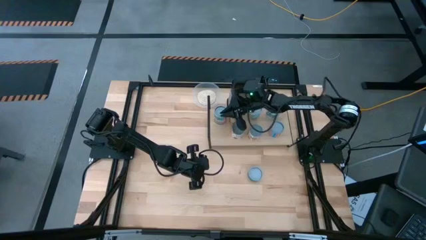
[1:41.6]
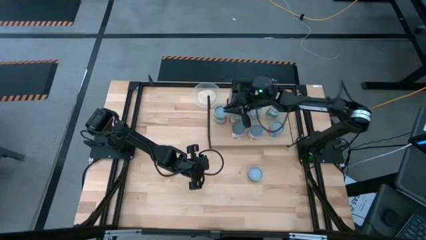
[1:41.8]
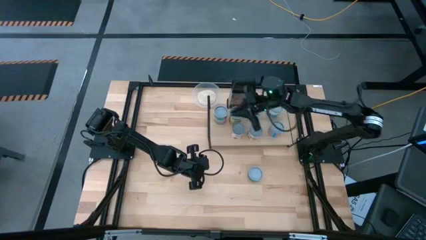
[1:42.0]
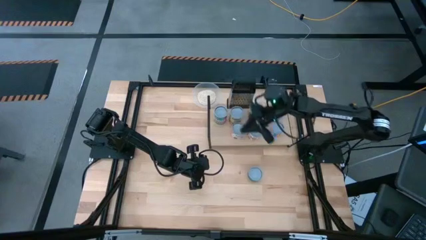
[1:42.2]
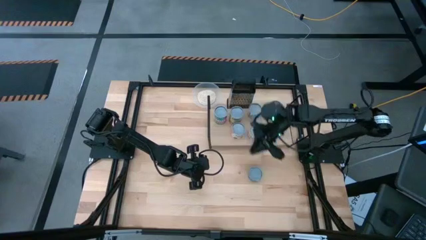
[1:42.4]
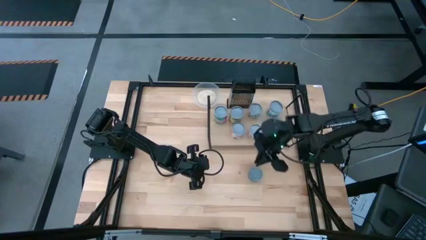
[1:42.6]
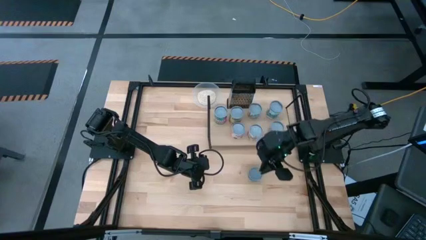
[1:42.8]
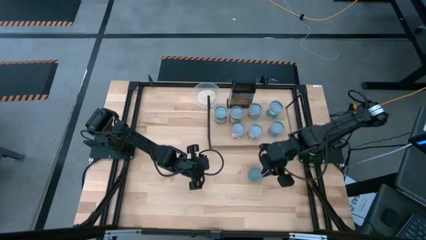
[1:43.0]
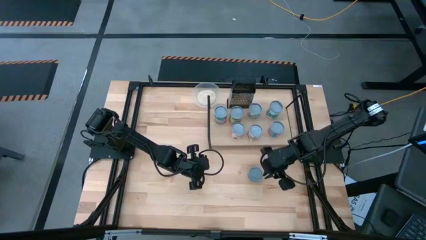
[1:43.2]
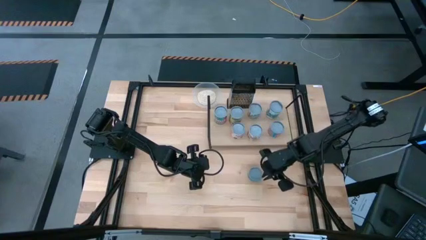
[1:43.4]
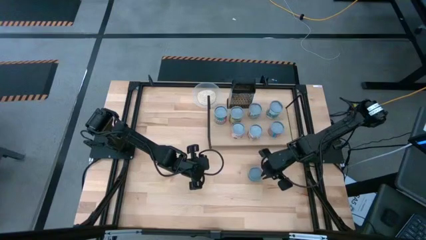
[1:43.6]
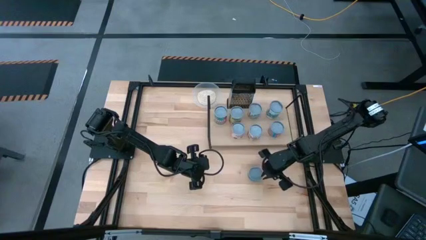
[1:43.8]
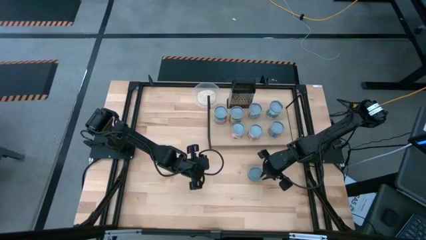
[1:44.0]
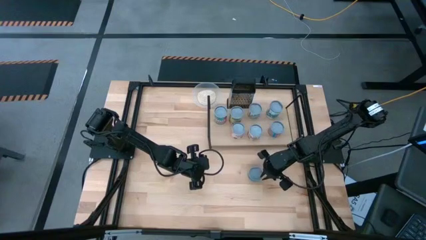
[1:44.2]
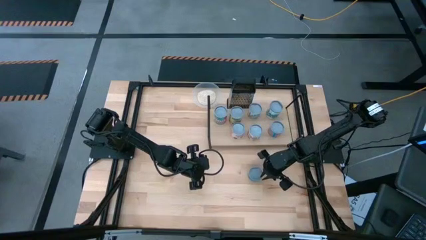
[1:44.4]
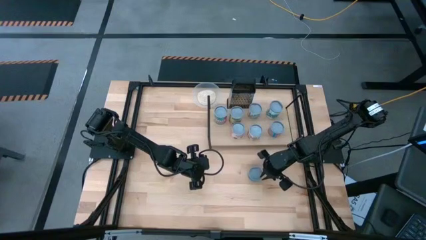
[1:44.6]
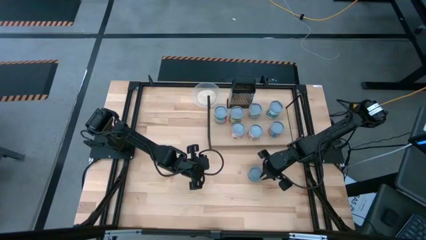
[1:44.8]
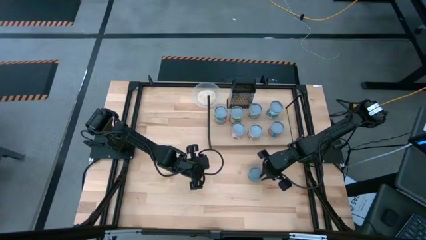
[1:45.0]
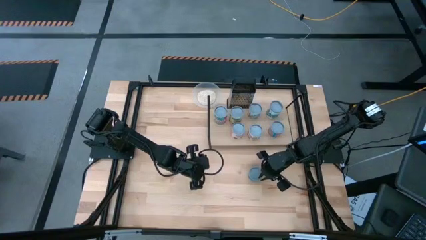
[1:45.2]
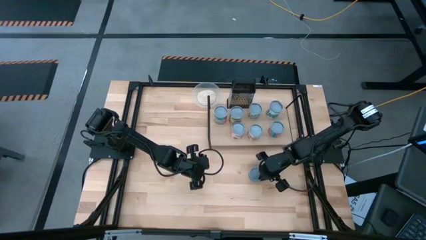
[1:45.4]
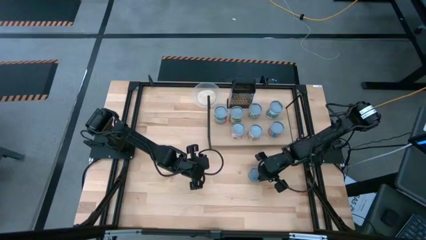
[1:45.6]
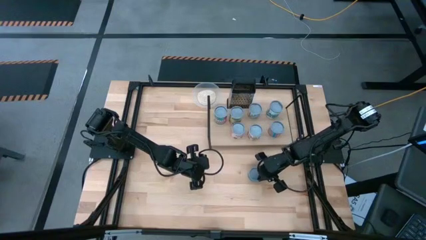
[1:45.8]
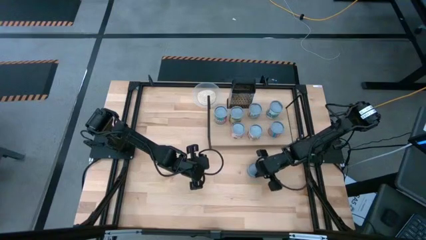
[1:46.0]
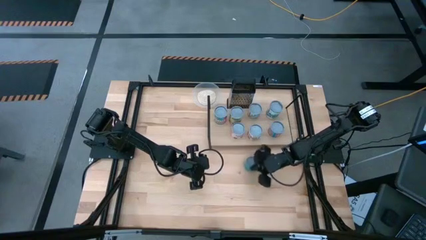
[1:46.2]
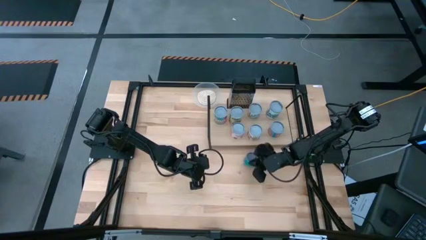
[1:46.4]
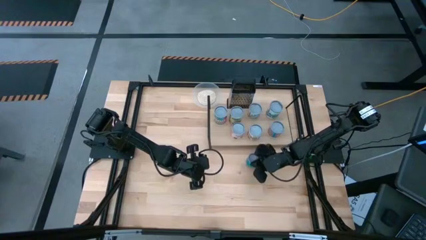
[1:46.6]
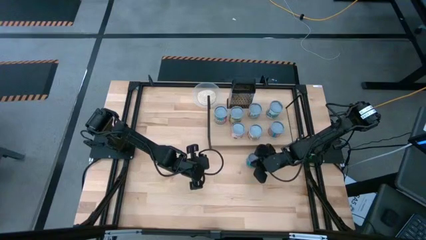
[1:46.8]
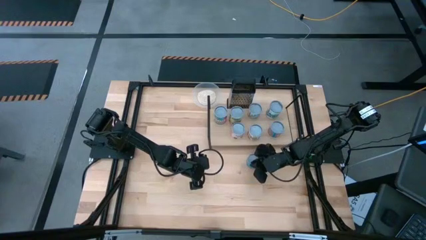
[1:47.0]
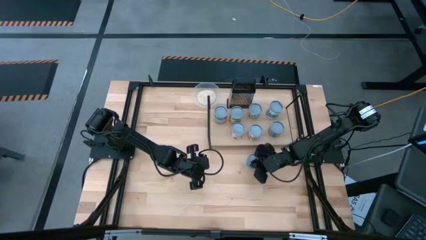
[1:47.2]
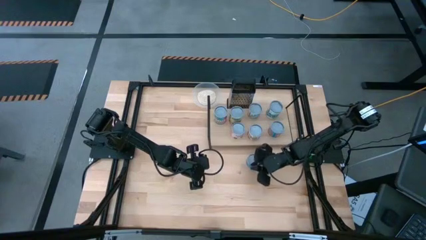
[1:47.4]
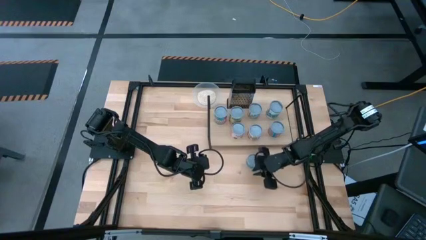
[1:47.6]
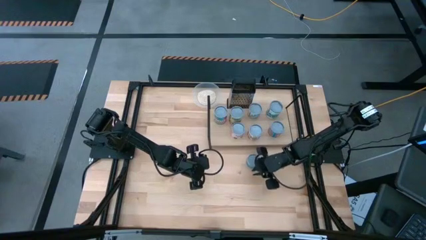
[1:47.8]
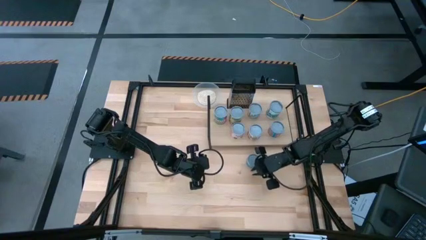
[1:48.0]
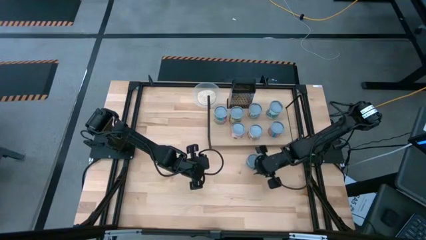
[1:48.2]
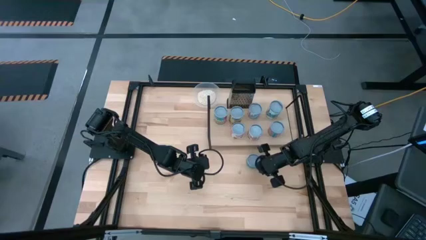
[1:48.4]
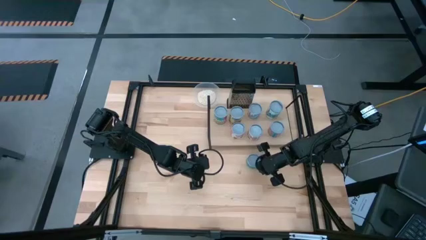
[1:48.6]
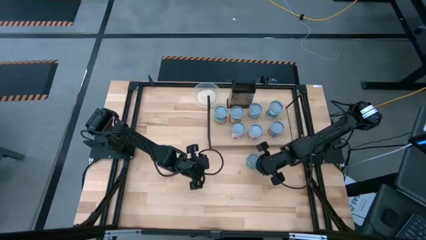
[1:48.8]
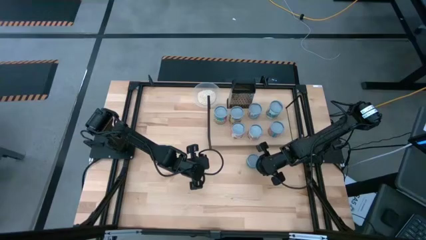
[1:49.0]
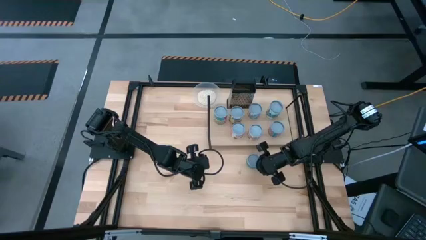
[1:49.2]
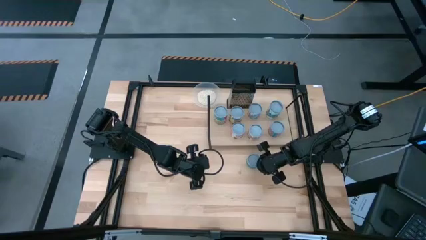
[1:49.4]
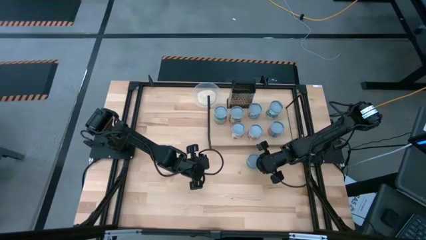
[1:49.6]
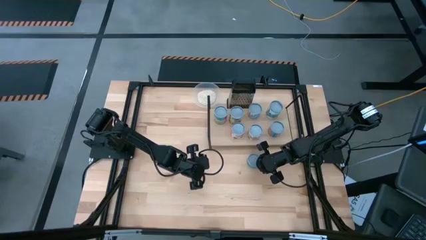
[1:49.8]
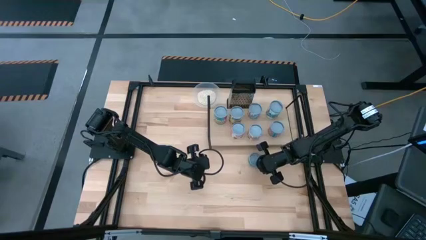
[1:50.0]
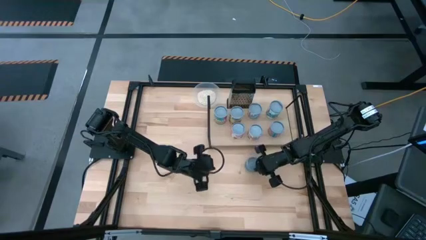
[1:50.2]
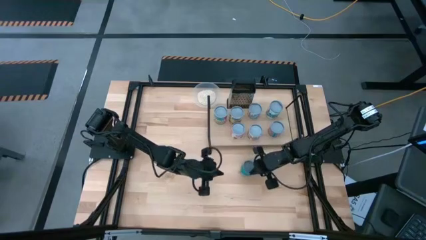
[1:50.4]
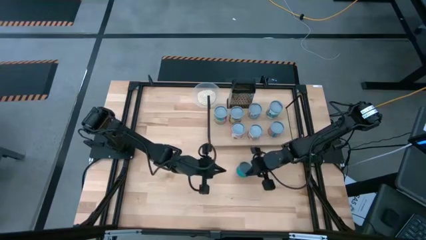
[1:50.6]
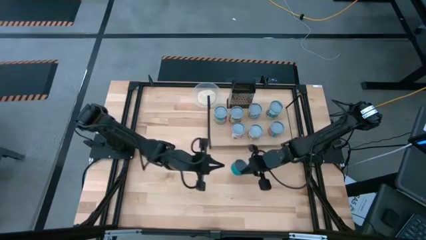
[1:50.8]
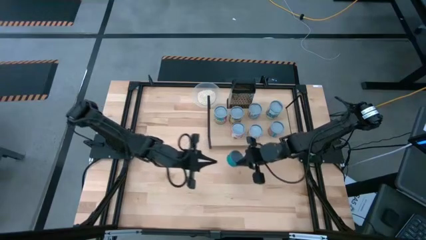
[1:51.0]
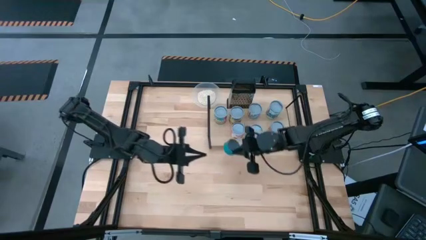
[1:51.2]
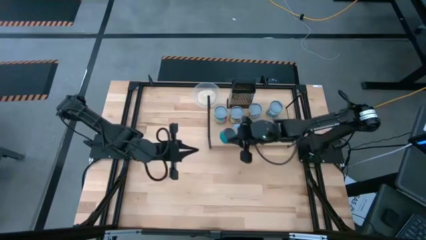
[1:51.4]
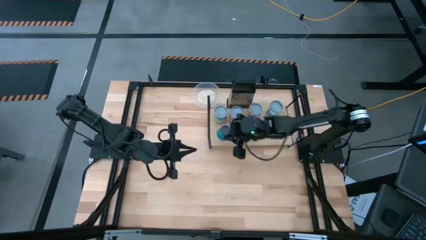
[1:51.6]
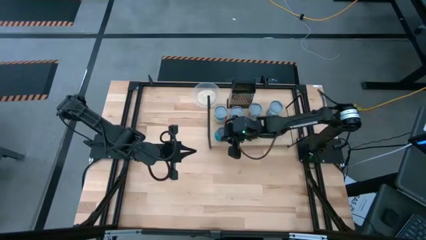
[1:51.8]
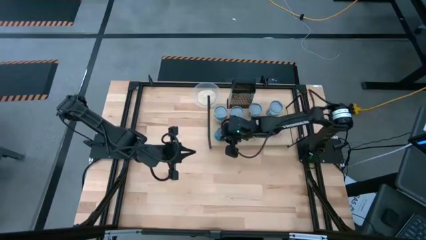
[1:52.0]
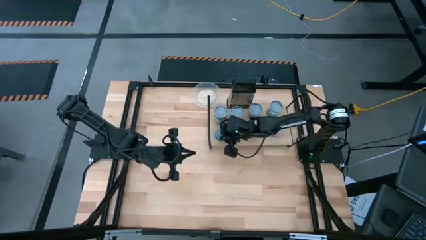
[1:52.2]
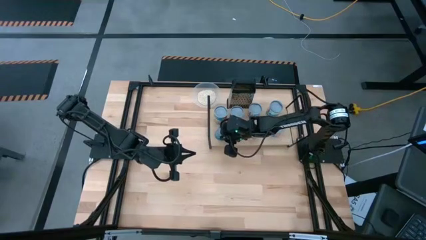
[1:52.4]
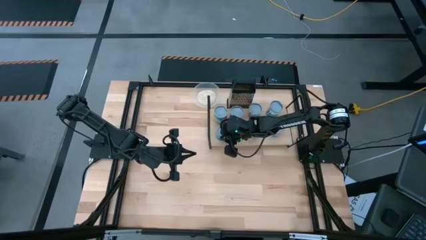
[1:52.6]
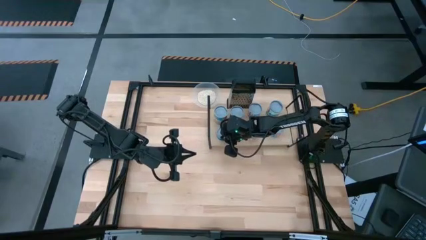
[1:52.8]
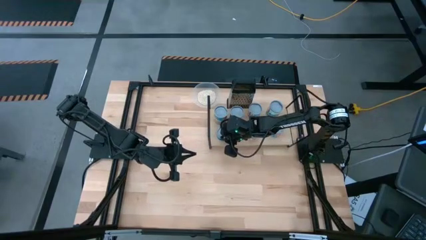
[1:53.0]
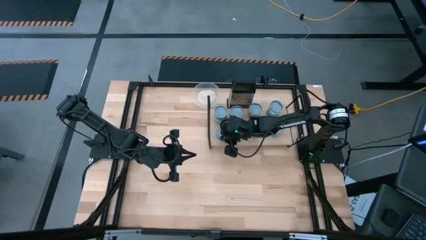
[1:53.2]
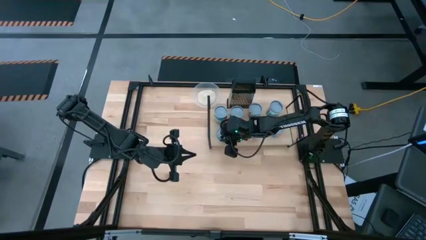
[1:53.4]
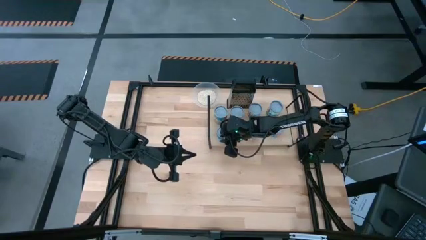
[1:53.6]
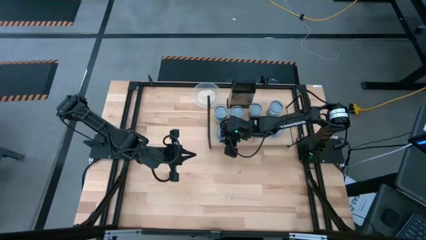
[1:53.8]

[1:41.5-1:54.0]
Task: Pick and place cans onto a shelf
Put the canned tuna on the shelf

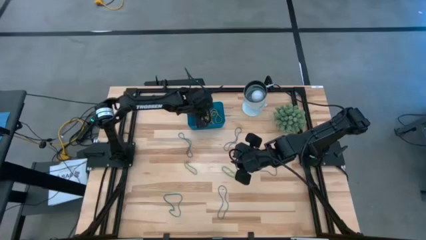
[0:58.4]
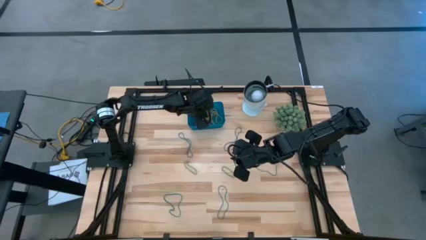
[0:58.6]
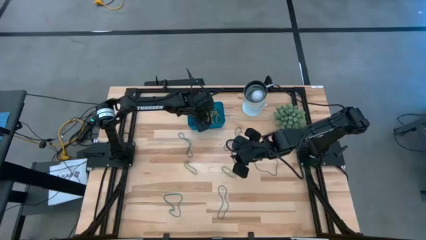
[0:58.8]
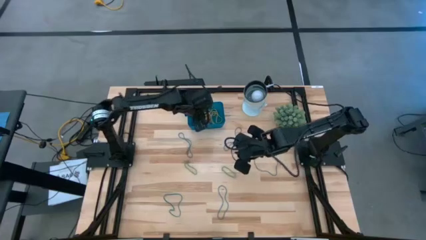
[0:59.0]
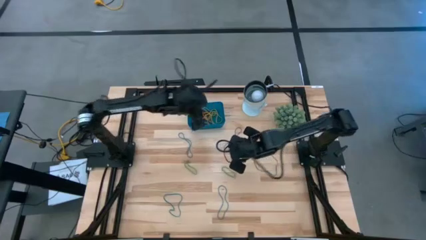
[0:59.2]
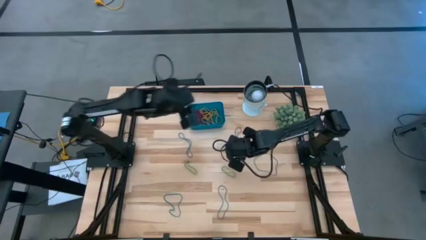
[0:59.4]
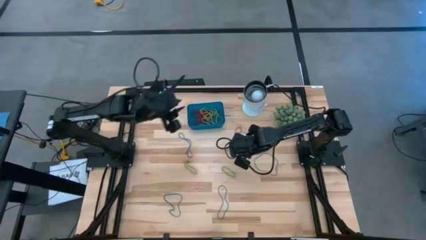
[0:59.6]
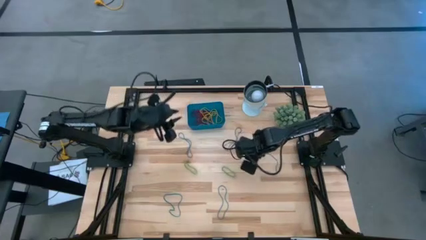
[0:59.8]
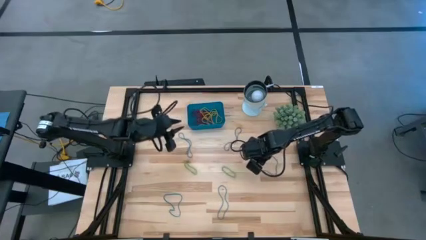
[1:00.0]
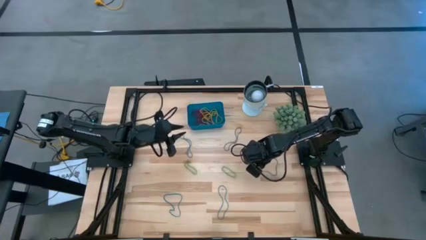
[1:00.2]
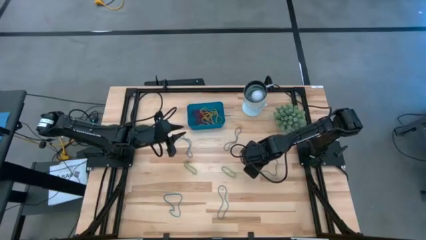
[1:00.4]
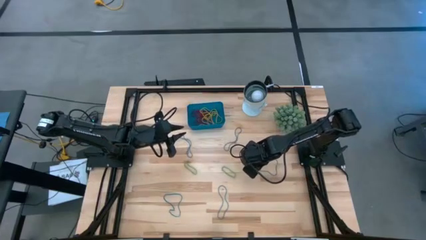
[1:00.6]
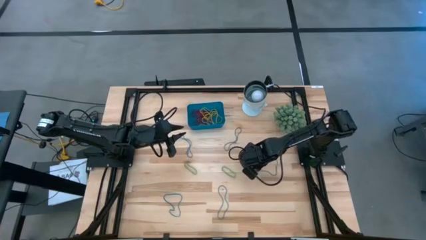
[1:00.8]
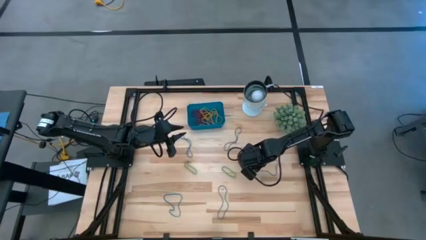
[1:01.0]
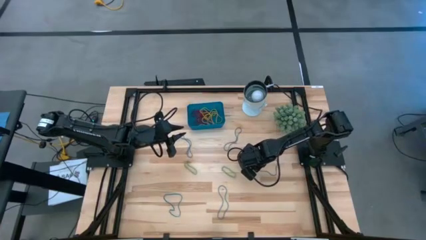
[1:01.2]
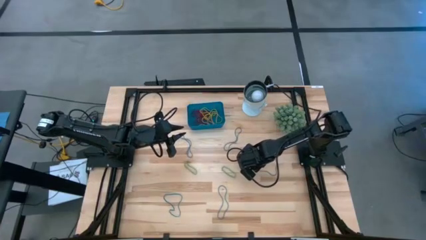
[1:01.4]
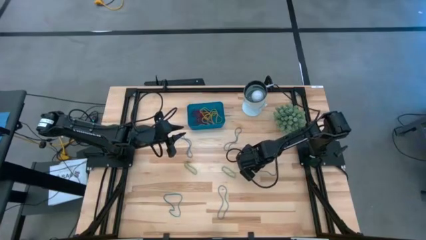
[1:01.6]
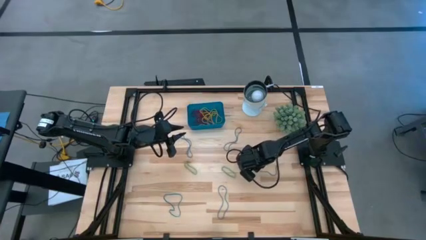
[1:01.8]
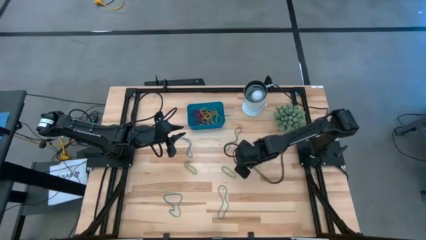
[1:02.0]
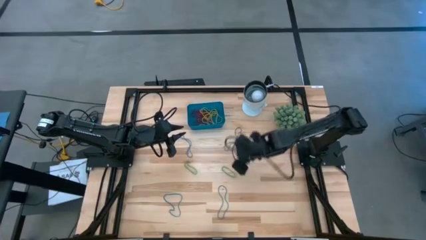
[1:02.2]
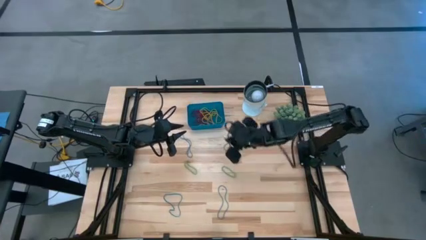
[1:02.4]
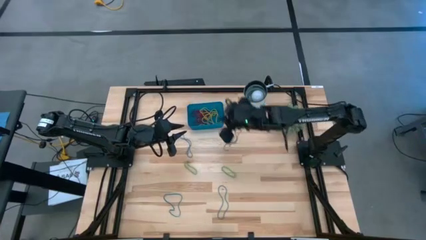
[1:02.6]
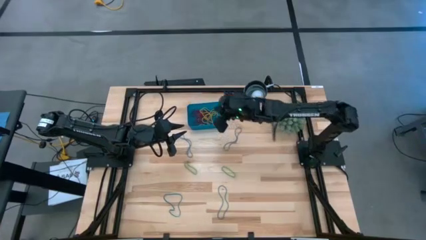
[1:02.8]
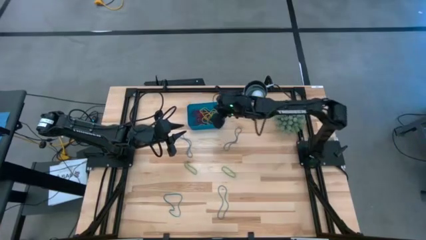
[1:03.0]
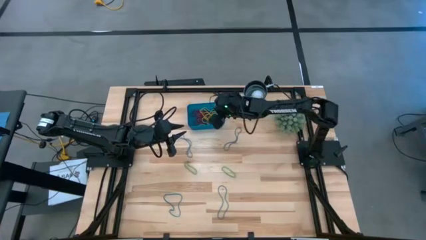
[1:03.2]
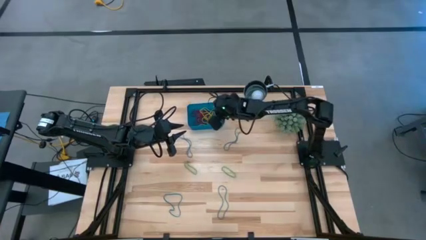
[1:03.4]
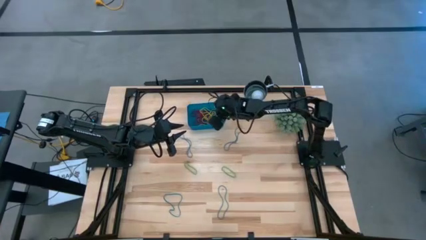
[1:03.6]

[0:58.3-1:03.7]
Task: Pick and place items into bin
Put the blue rubber band into the blue bin
